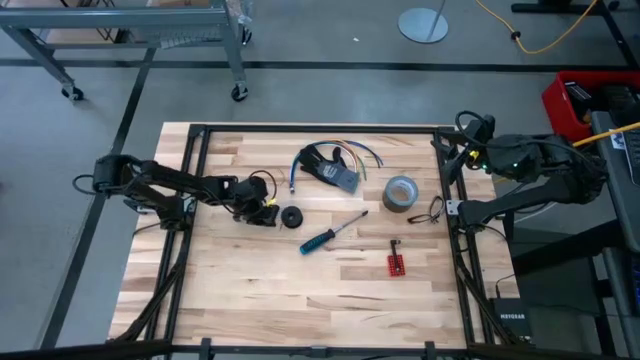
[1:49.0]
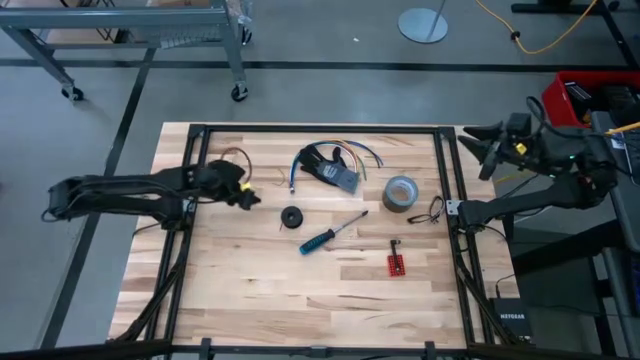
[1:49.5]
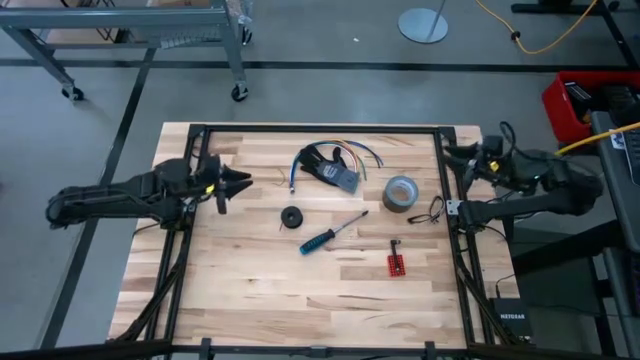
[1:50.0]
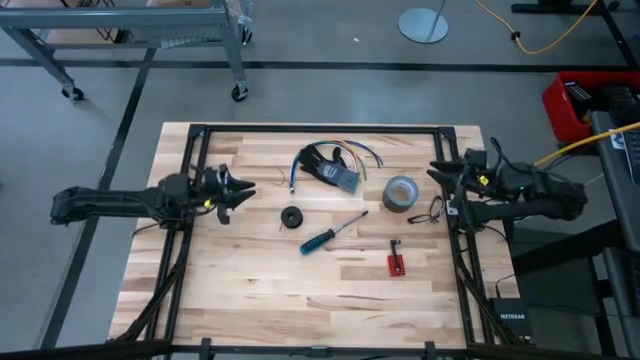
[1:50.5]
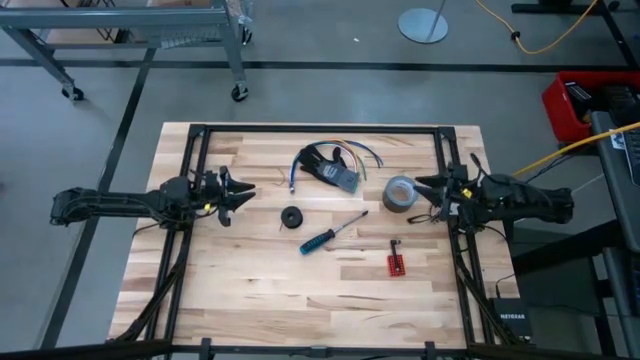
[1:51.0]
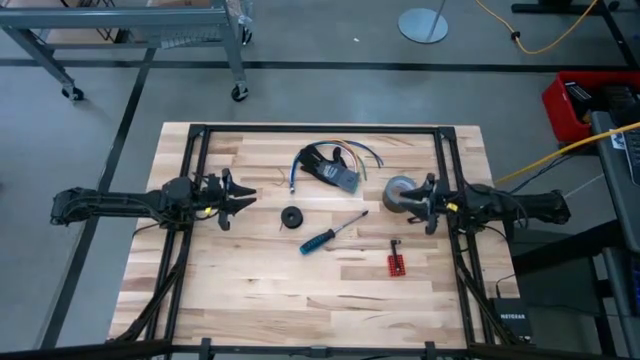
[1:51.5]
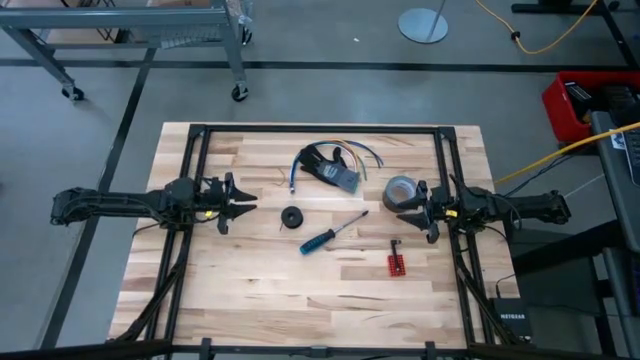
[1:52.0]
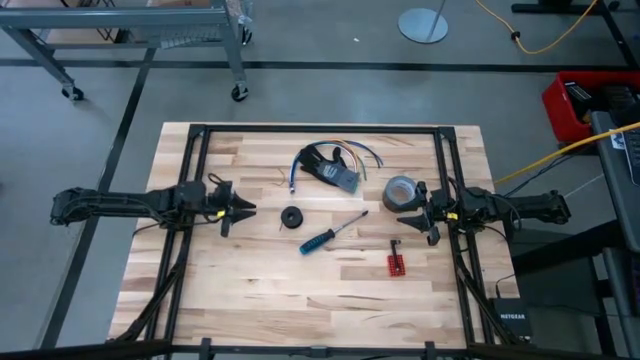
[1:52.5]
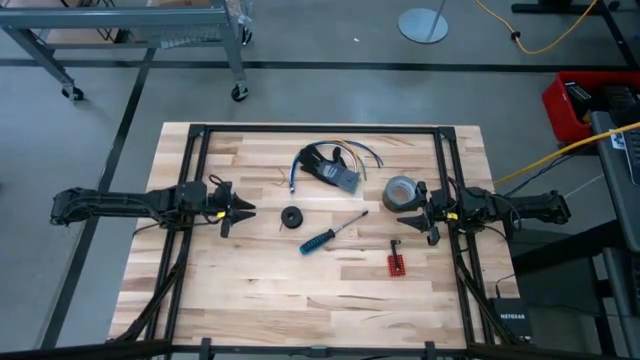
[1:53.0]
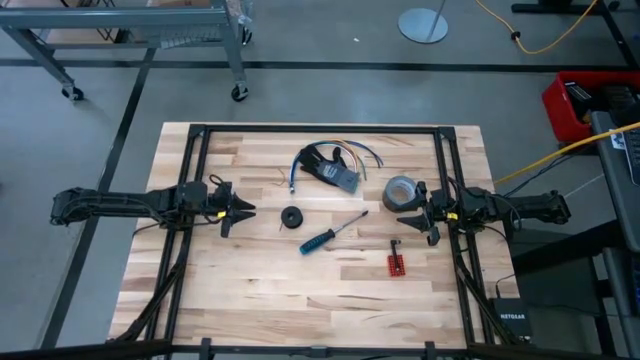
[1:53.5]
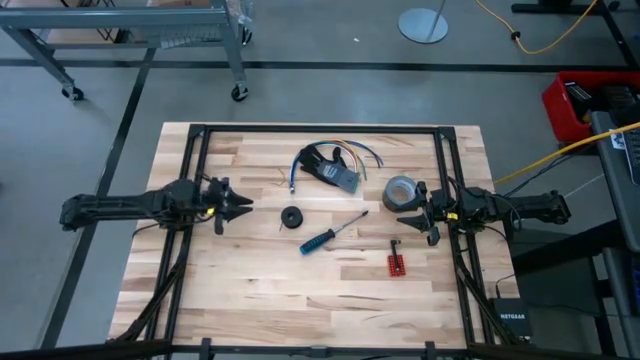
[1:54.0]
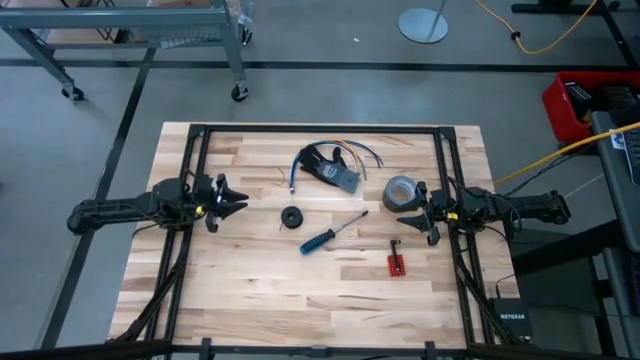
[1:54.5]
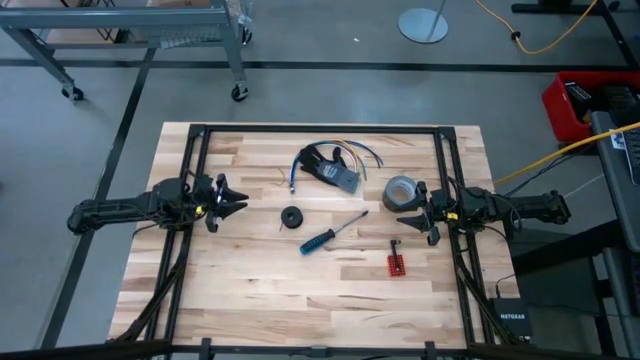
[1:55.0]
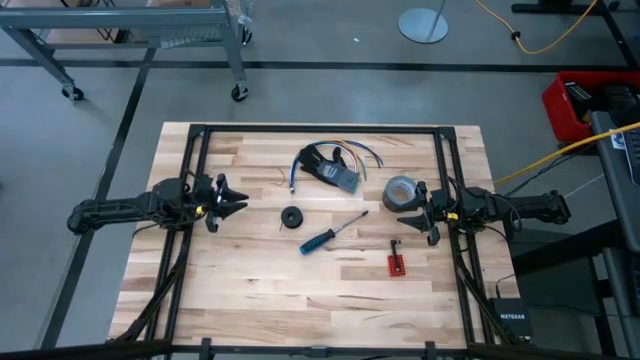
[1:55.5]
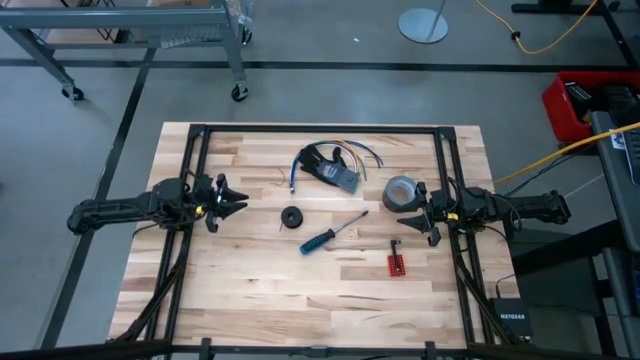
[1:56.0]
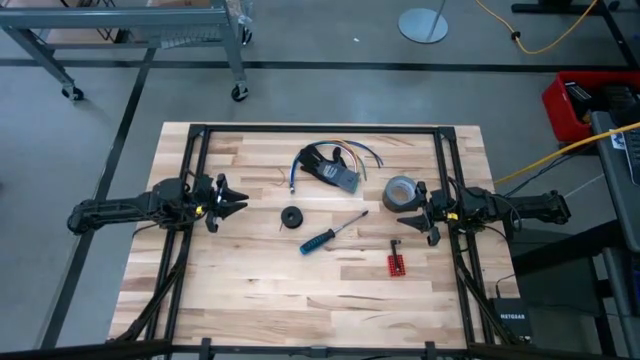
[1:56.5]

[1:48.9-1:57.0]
Task: Coil cords
Return to Home Position

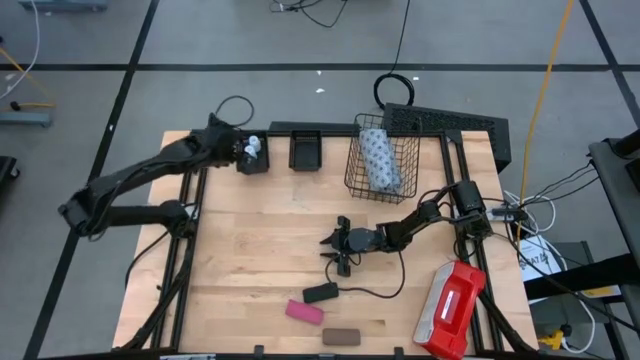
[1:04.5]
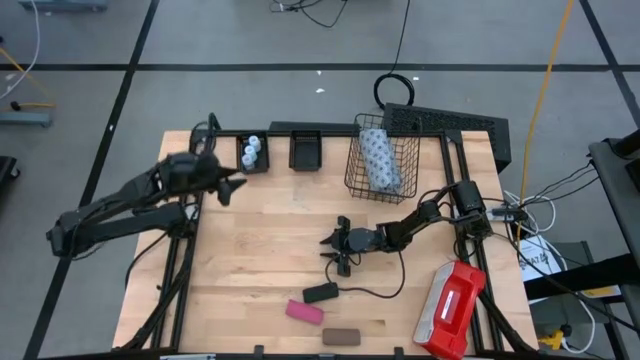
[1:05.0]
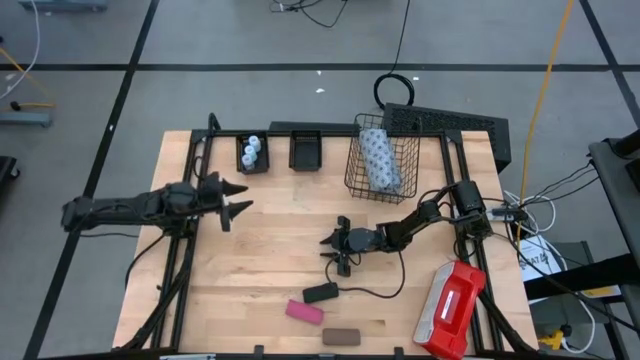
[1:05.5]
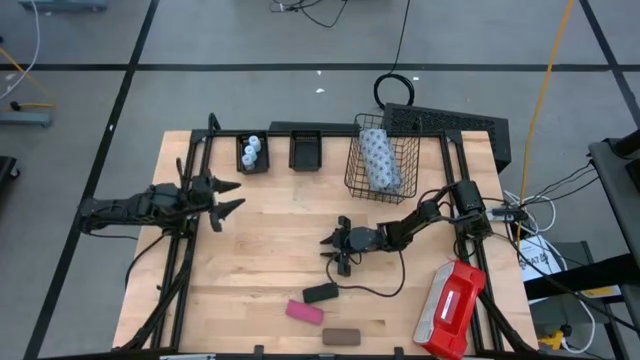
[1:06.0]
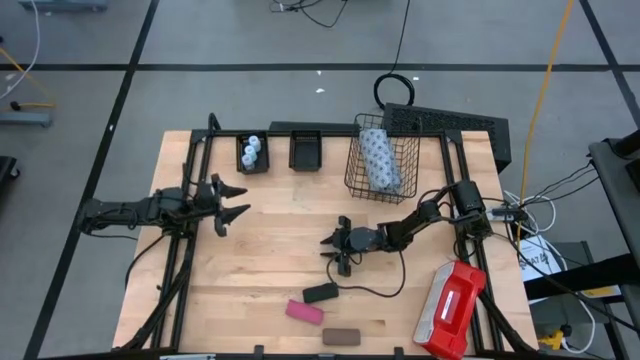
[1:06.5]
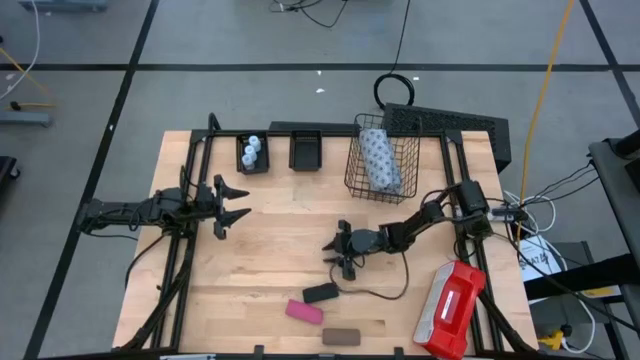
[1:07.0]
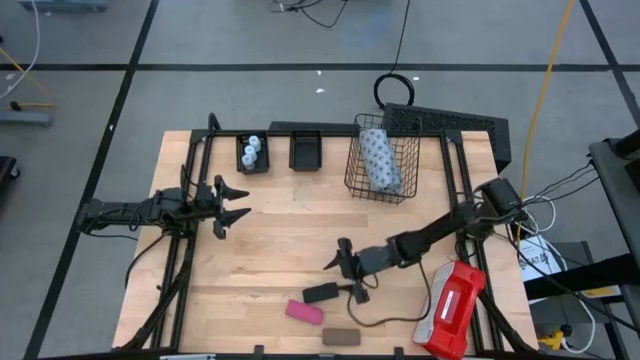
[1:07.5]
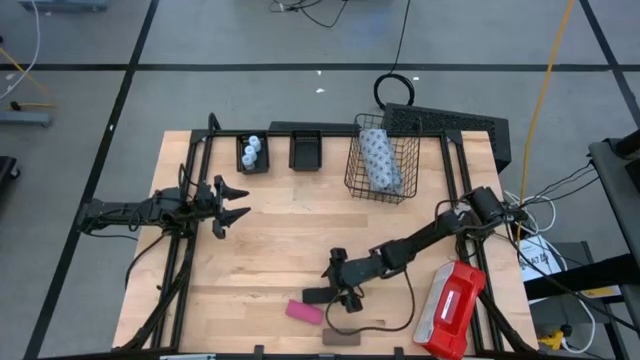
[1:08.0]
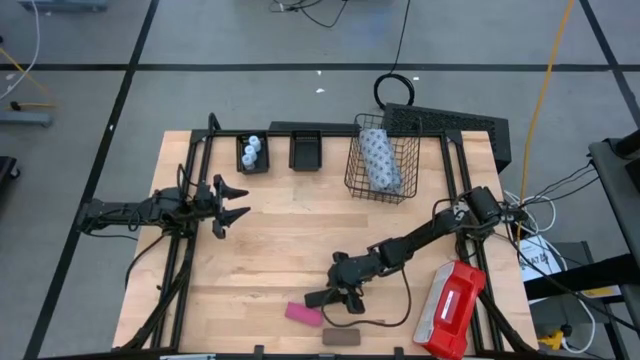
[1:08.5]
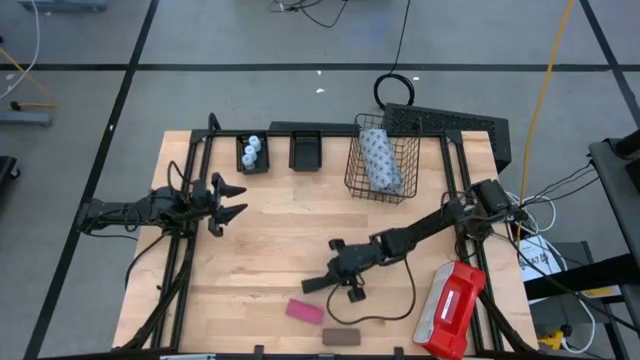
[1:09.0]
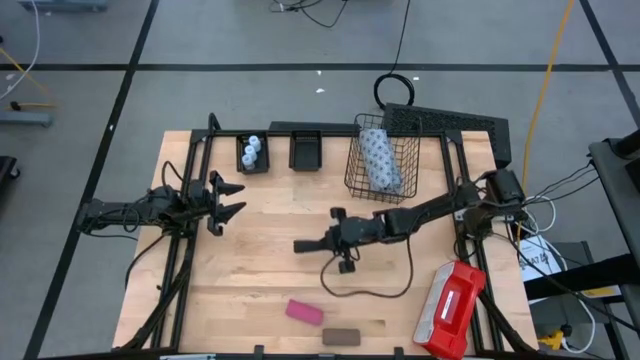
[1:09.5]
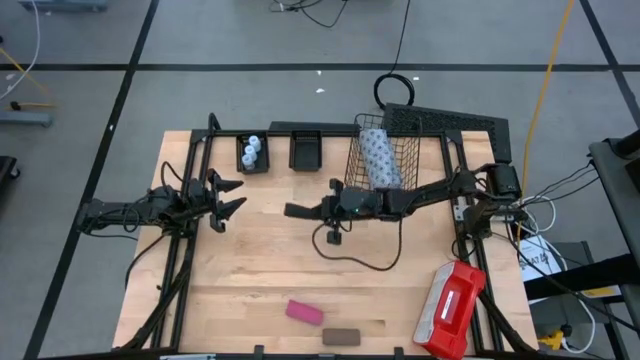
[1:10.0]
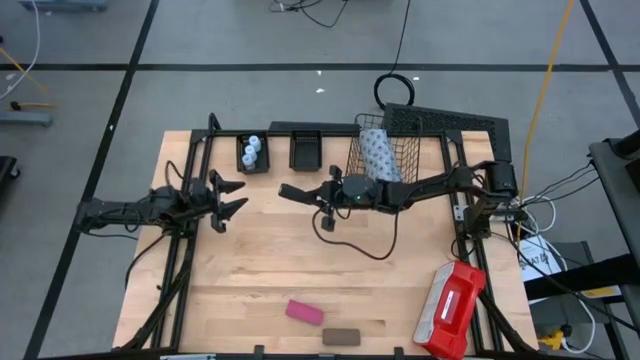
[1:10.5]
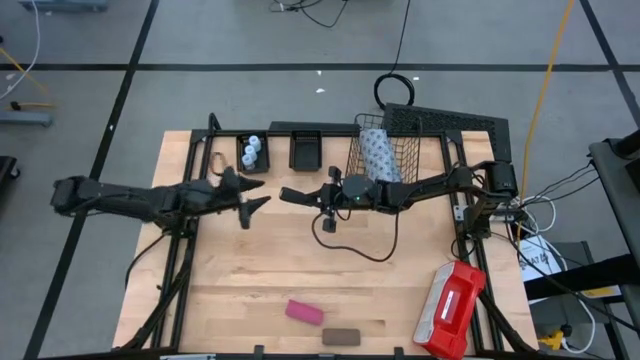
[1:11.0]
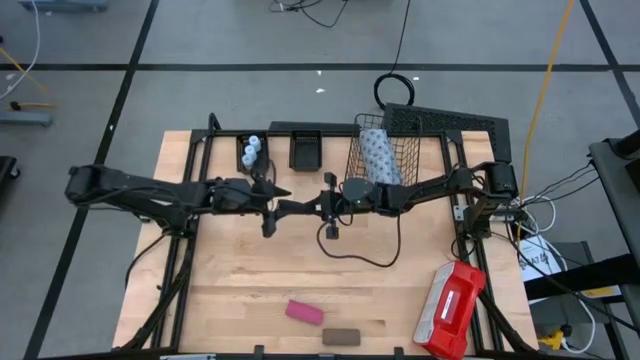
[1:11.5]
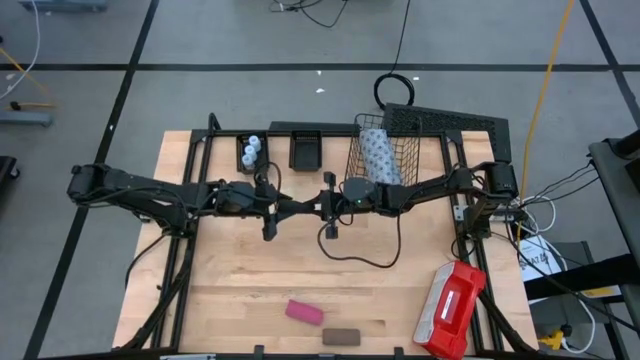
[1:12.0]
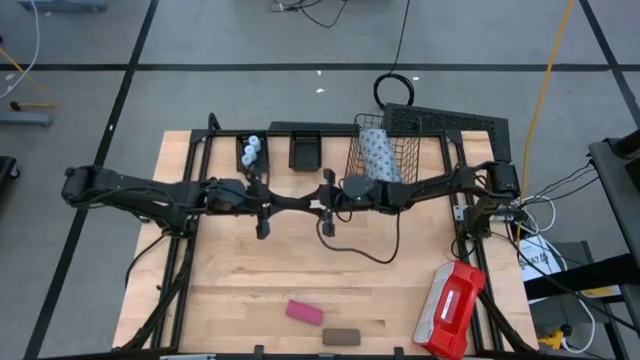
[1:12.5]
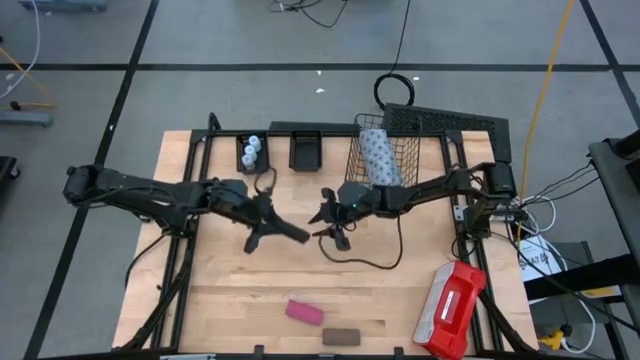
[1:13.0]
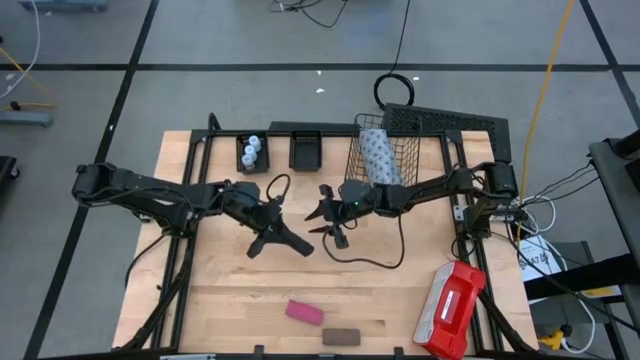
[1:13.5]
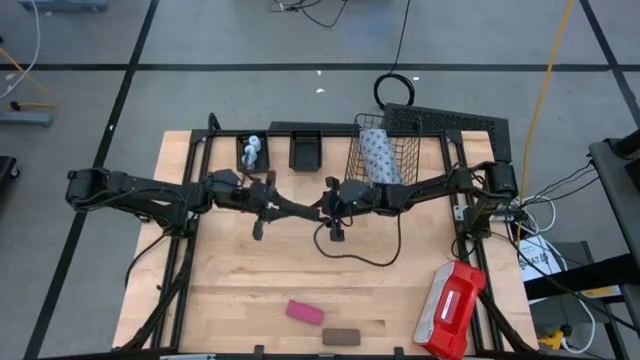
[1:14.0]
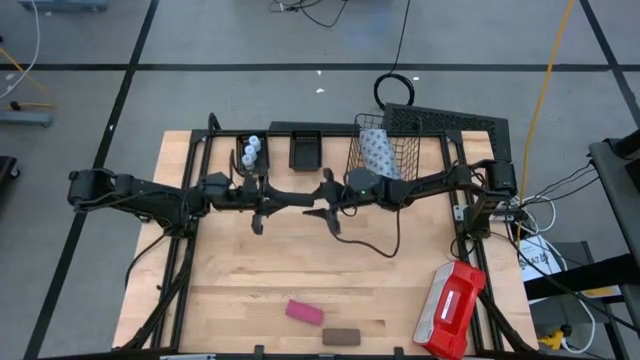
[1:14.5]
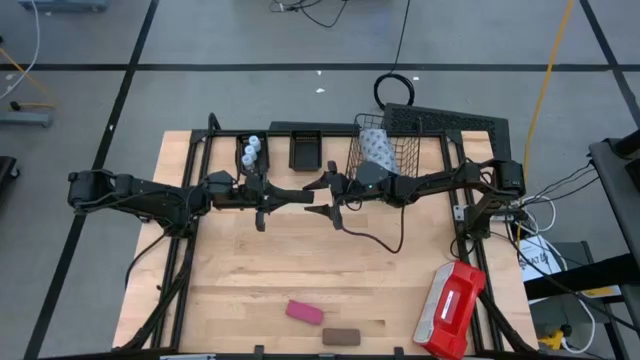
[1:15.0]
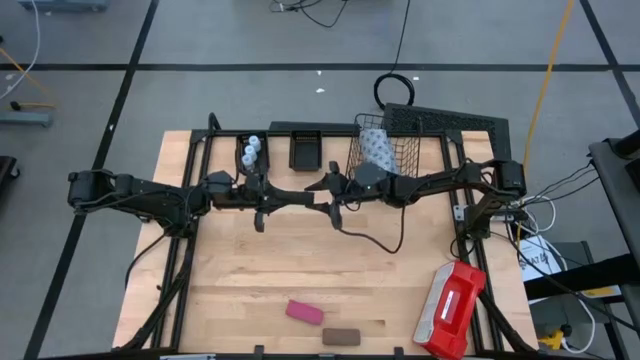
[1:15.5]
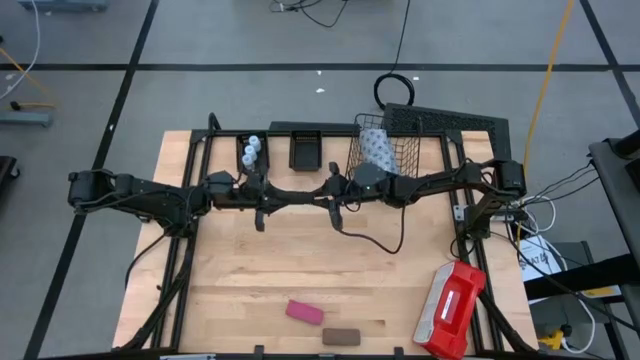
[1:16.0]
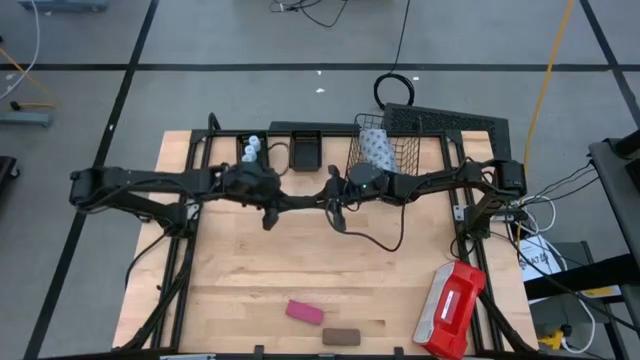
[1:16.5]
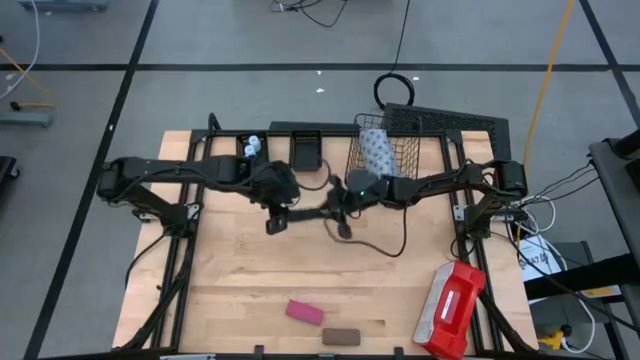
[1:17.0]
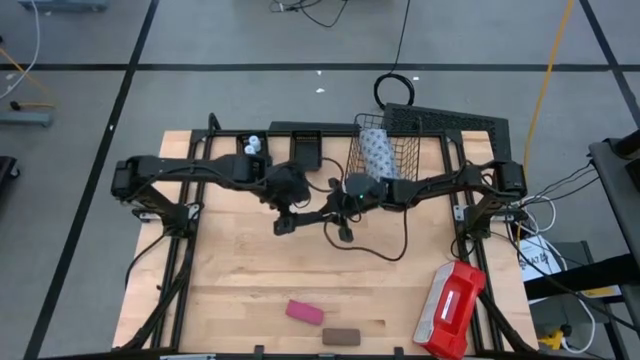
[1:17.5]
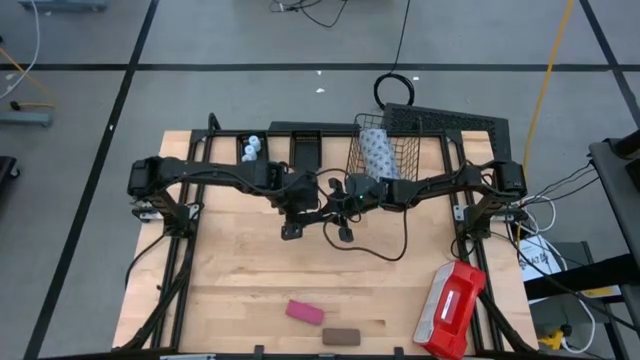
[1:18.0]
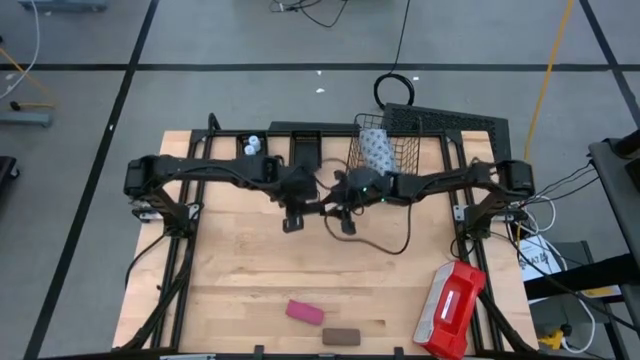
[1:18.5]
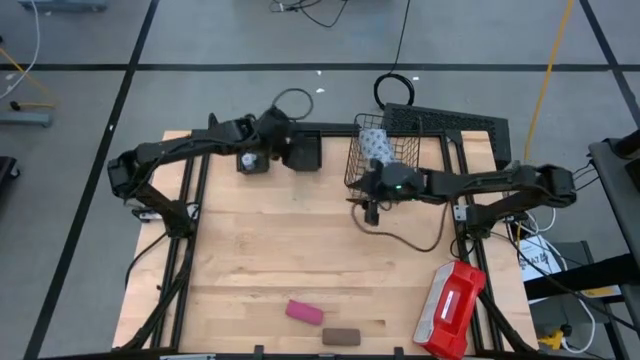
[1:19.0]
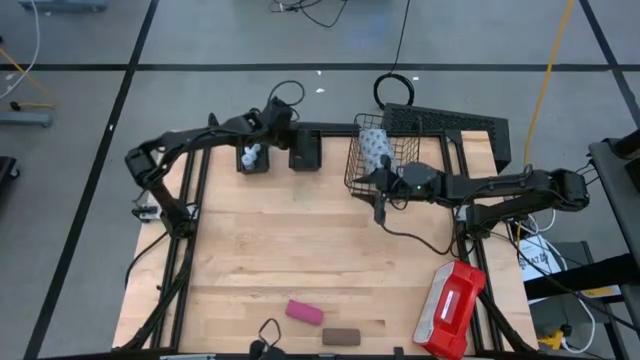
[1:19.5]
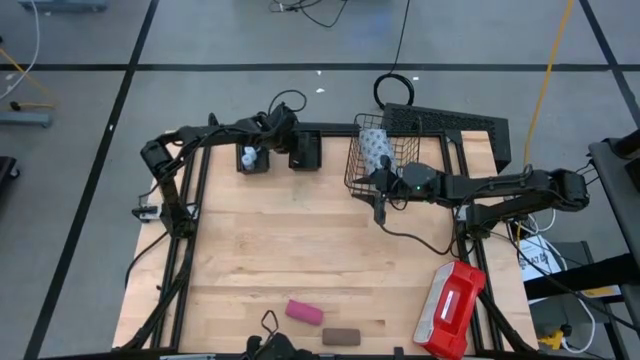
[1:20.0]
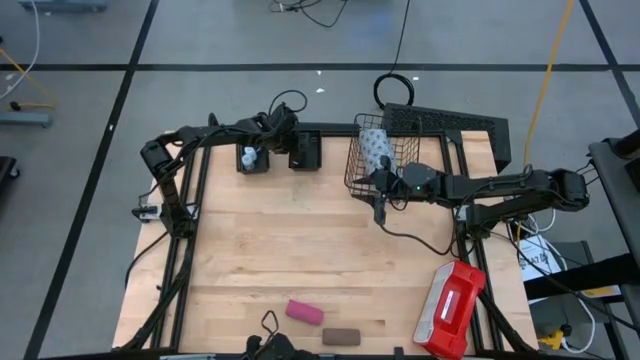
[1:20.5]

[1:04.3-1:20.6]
Task: Pick & place medical supplies in basket/bin
Put the black rolled bandage into the right black basket
